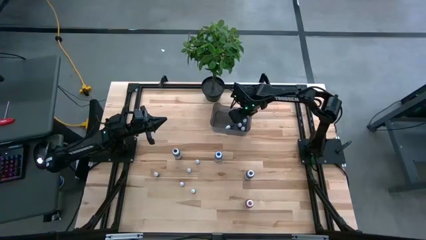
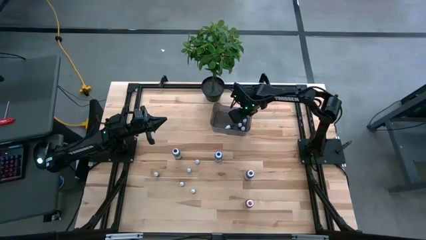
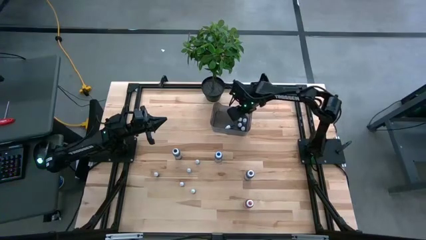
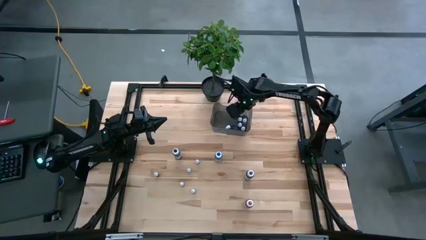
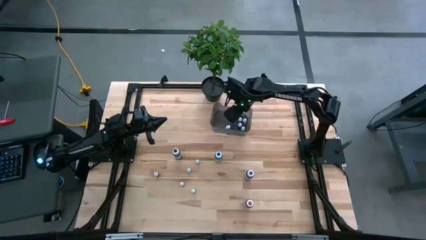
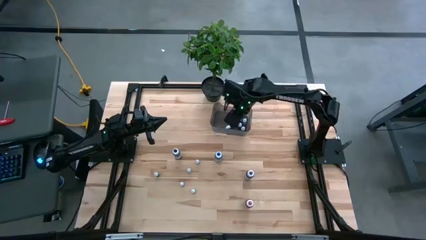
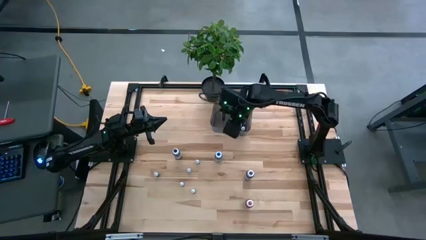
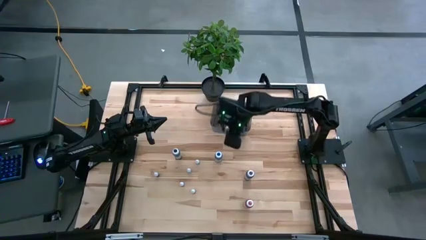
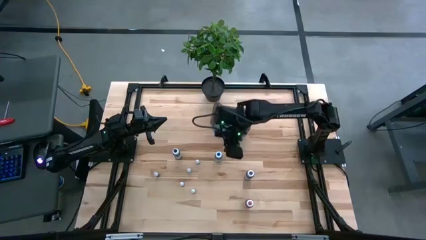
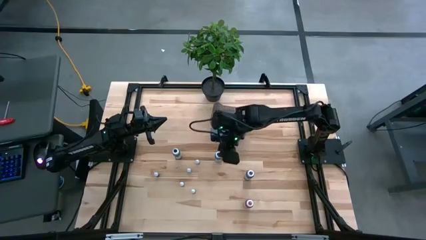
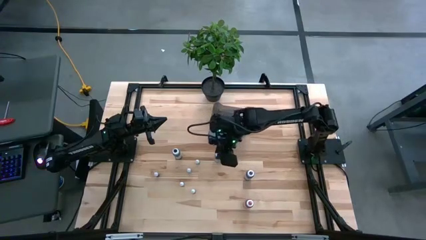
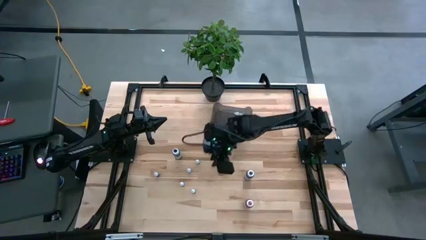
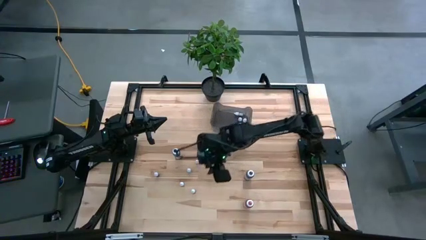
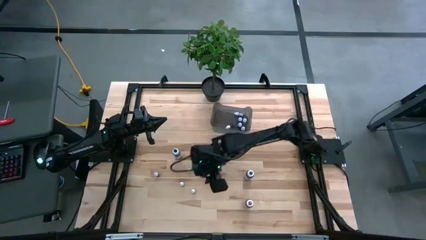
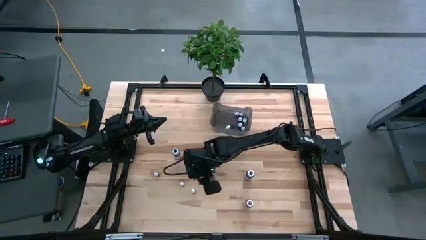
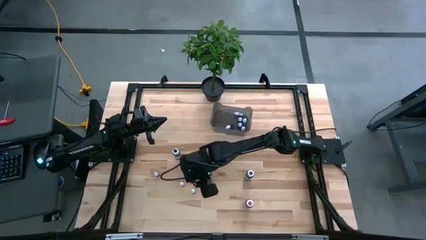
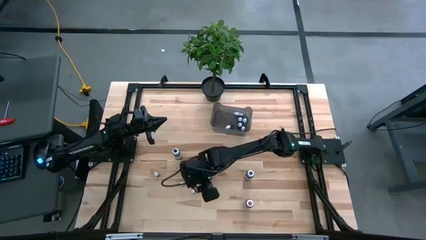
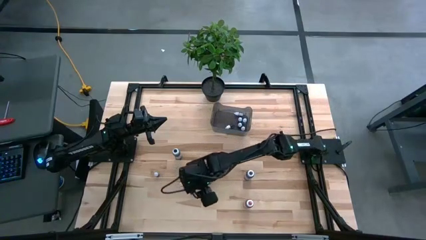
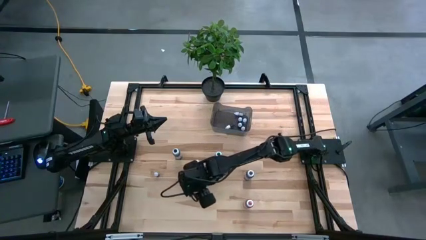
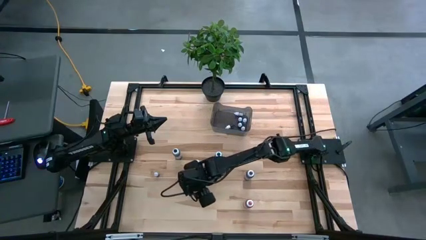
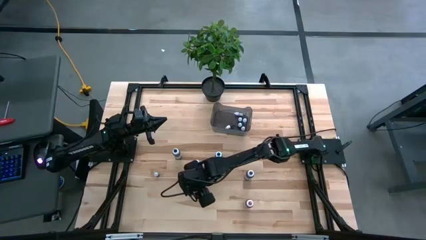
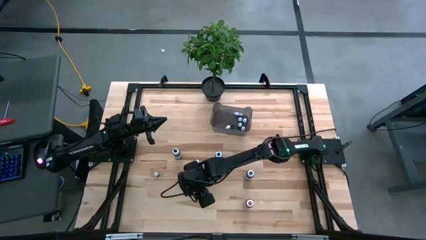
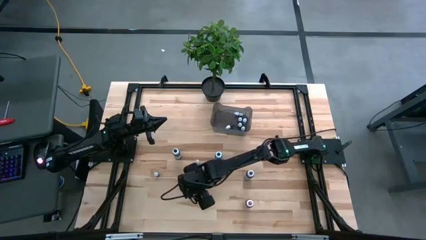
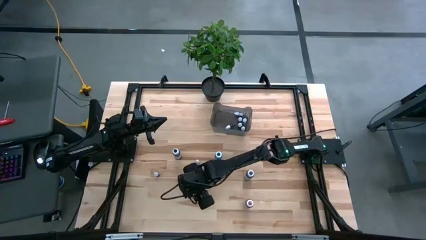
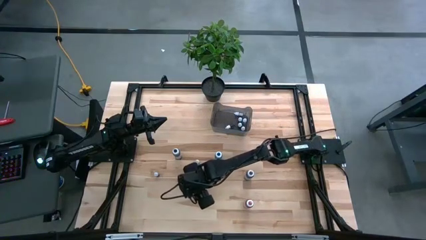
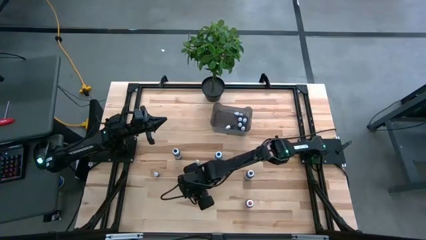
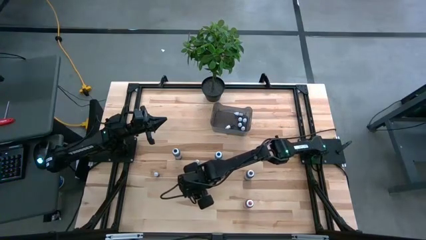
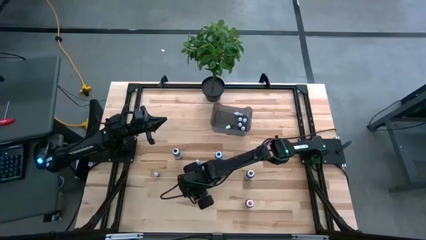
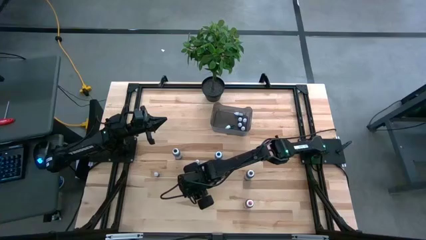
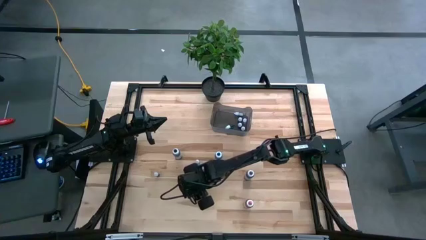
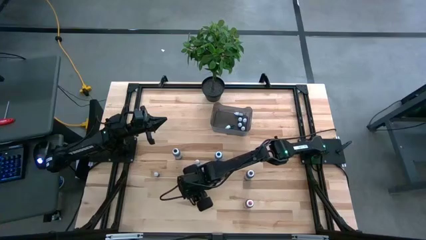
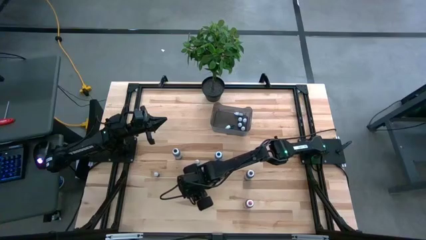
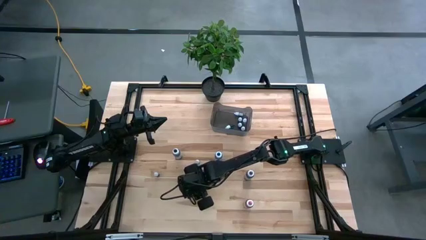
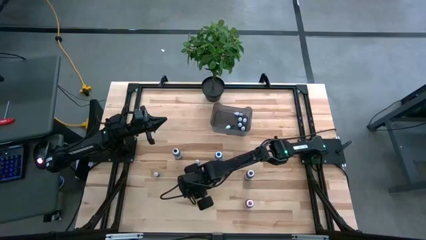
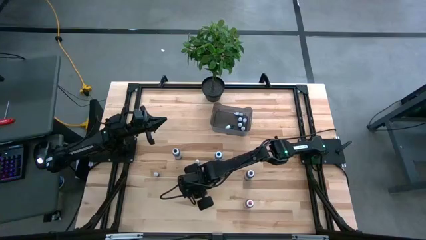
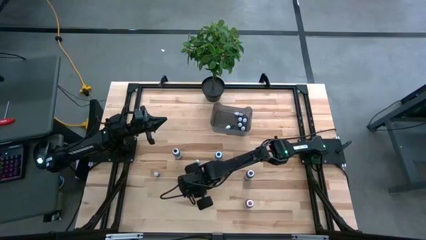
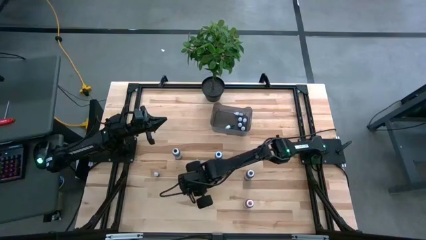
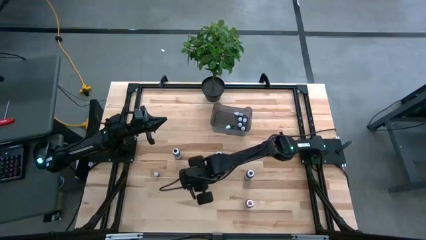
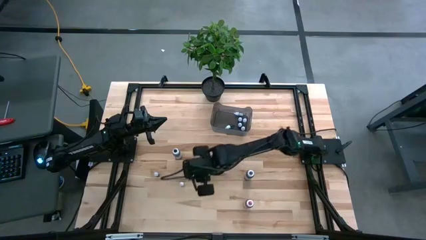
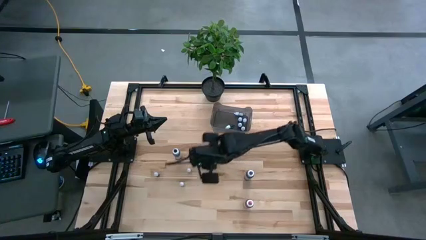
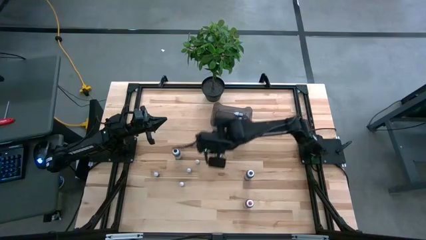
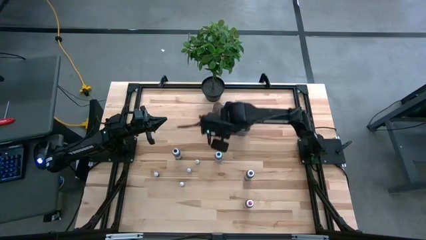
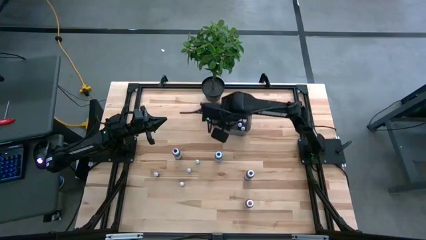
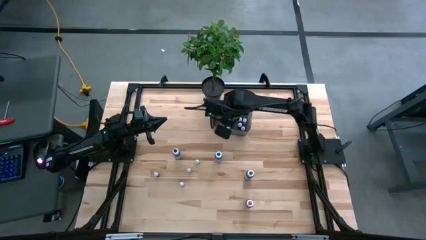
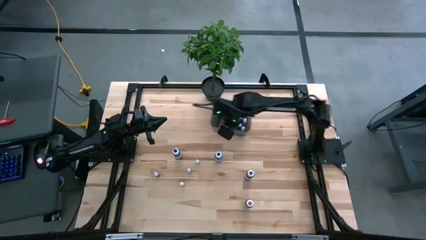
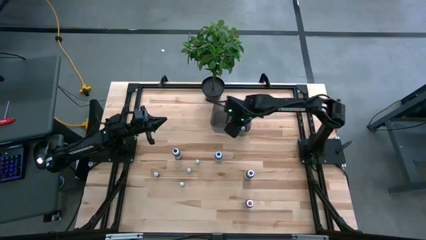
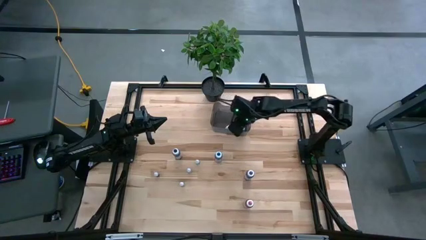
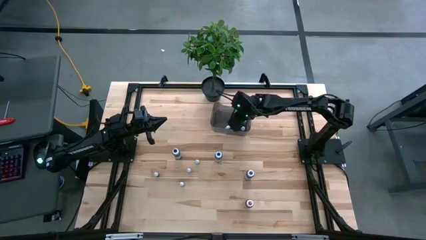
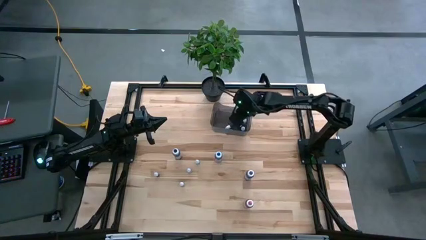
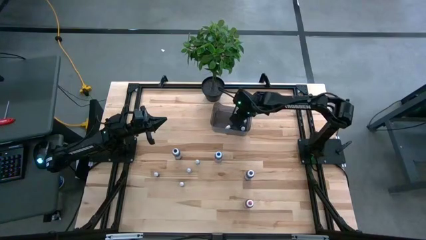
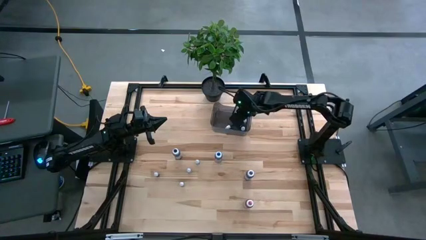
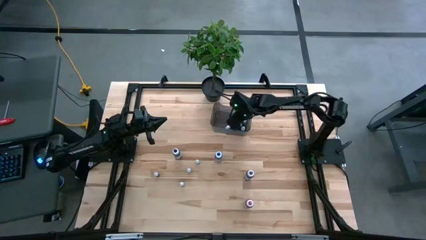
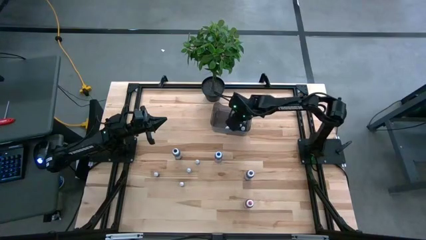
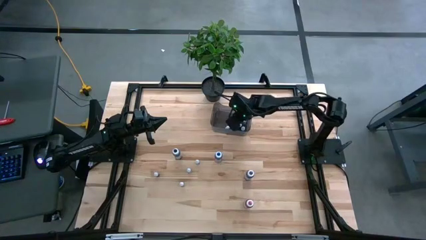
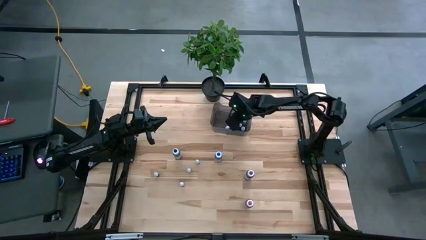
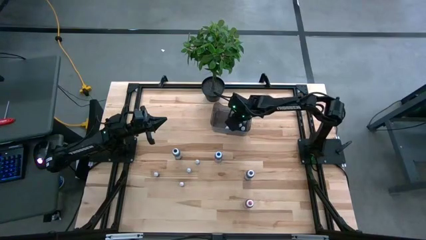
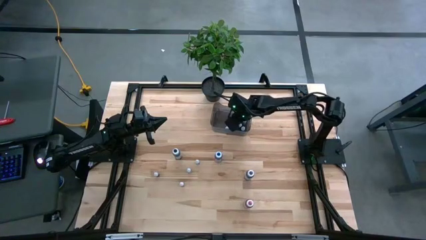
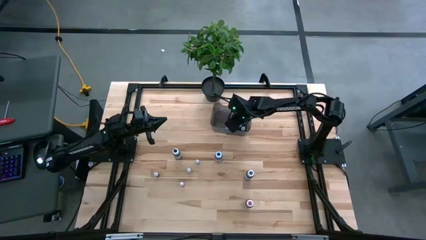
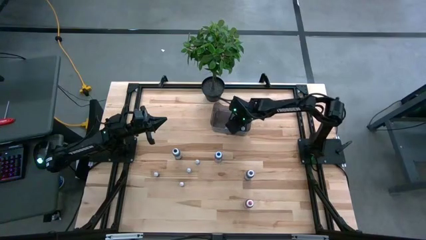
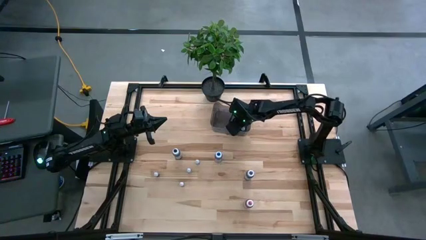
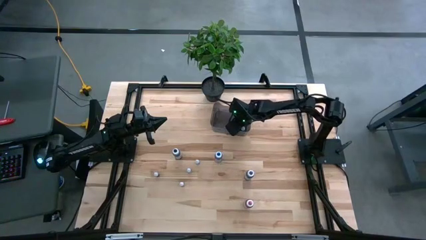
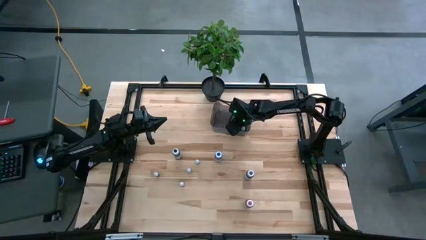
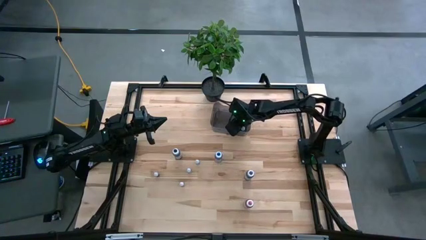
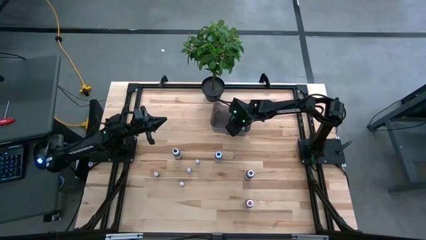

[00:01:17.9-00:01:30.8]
Task: Pick & Place food coloring
Put the small black food coloring bottle into the black bin

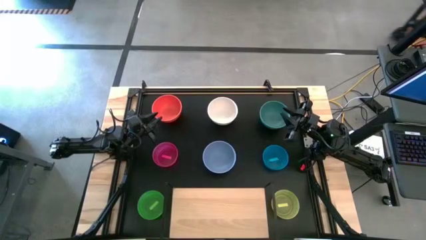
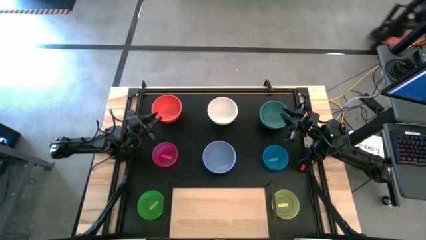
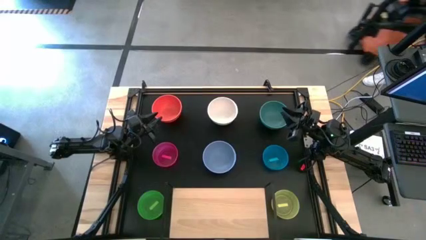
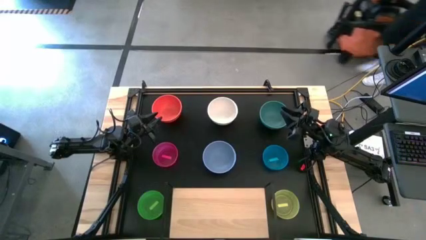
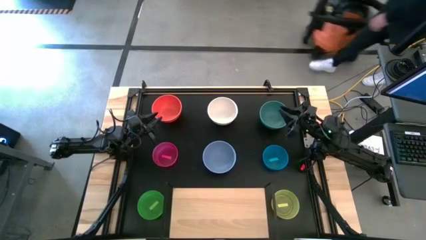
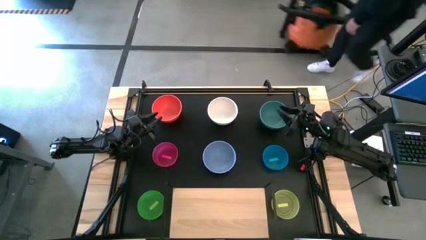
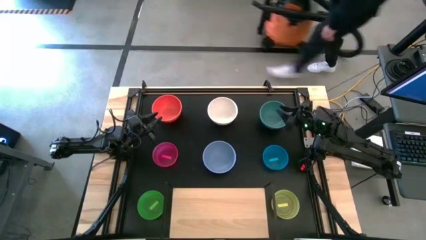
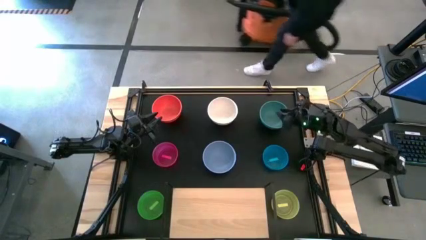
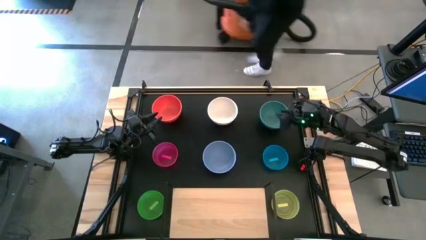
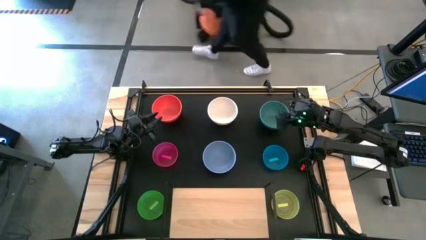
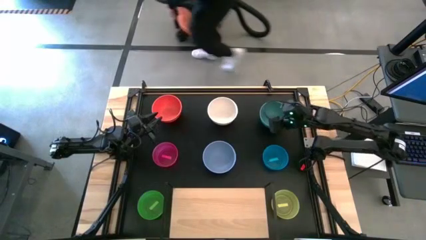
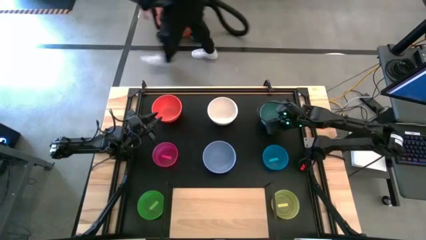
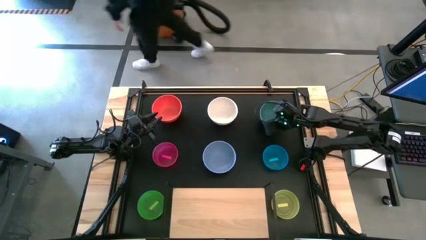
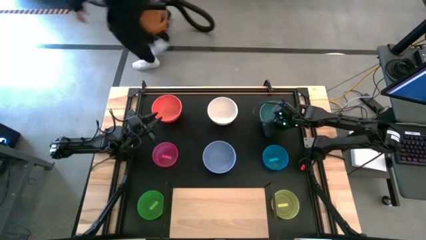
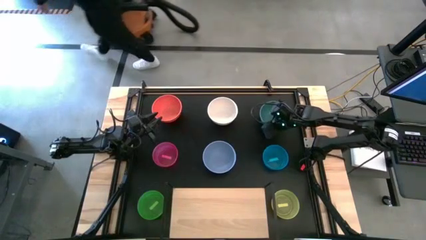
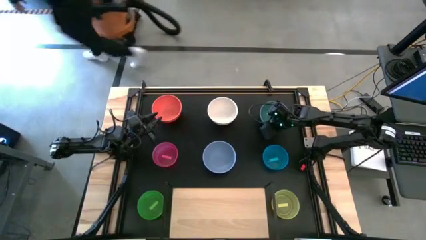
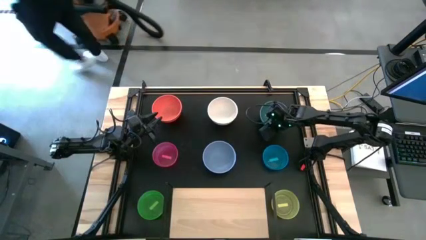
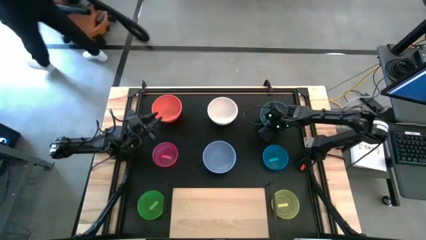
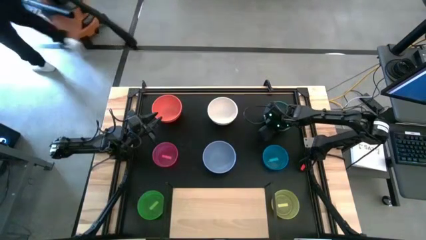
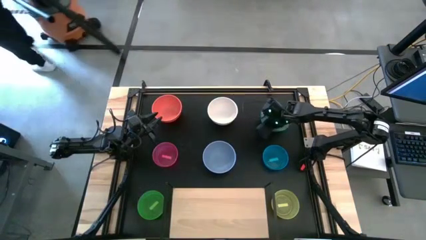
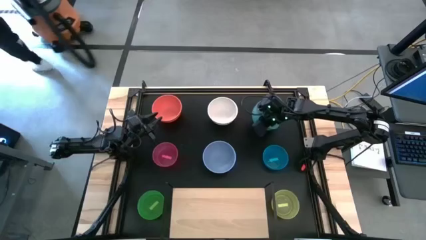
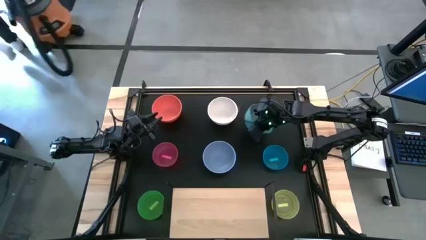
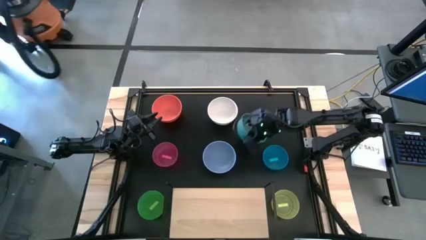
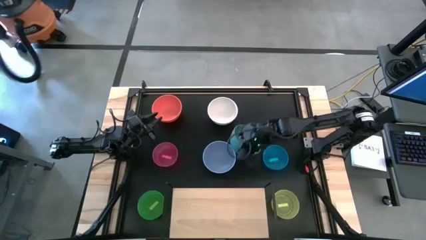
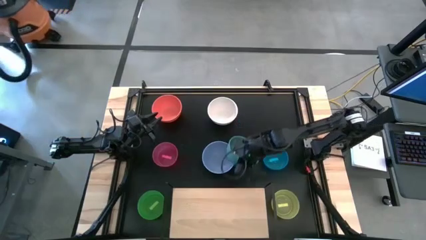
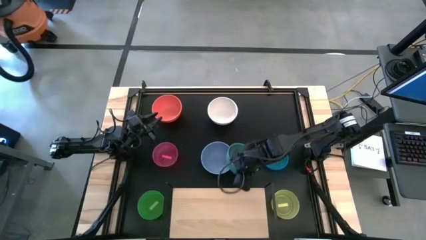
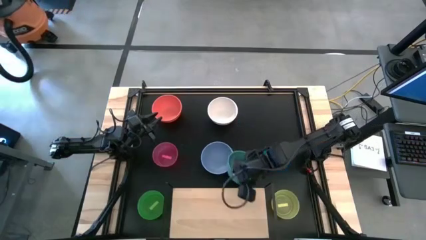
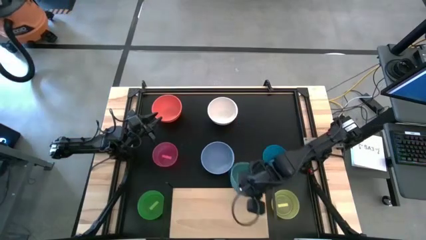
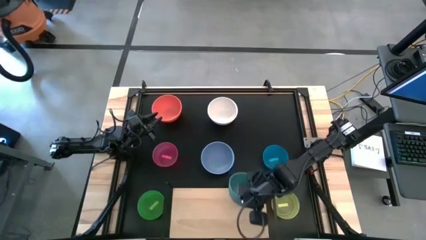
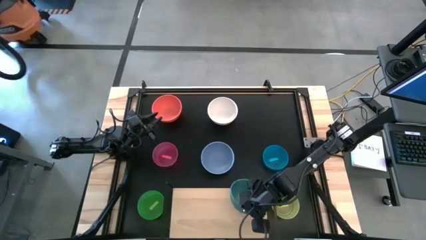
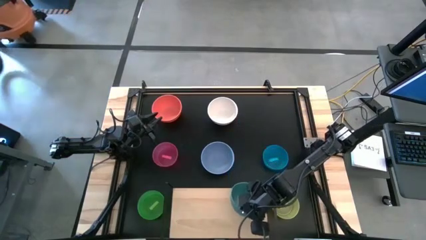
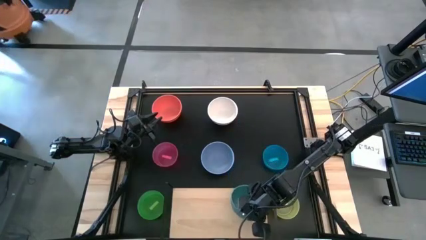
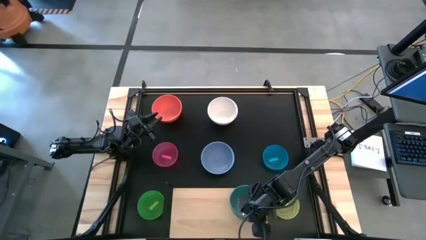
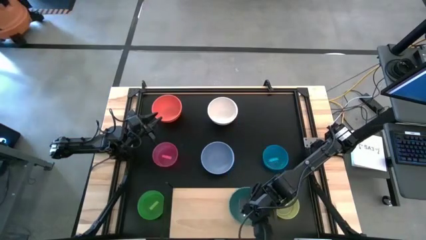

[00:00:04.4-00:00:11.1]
Task: Place and stack bowls onto a shelf
Put the dark green bowl on the shelf
